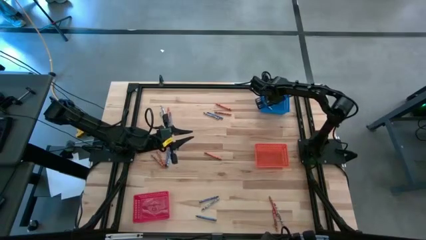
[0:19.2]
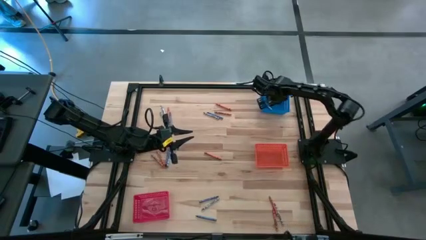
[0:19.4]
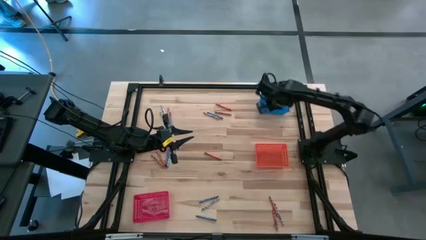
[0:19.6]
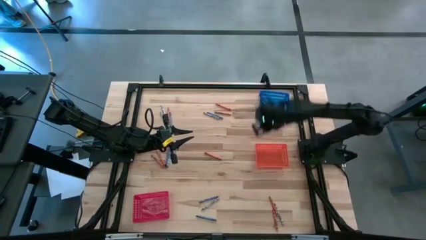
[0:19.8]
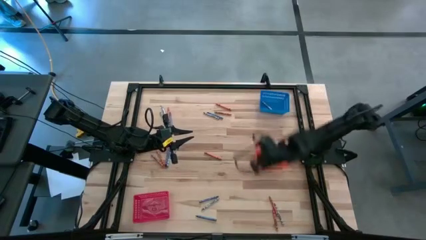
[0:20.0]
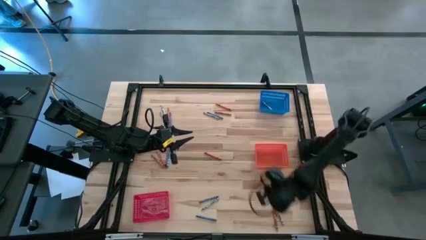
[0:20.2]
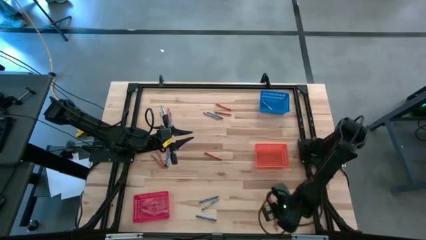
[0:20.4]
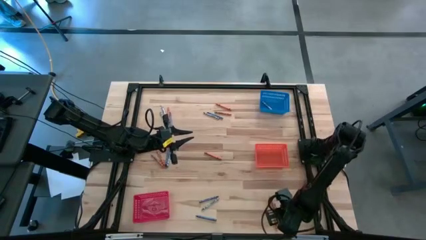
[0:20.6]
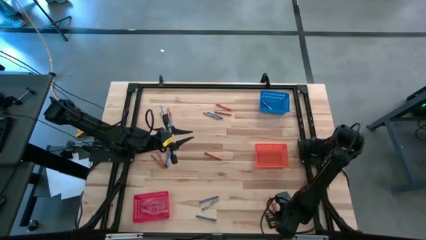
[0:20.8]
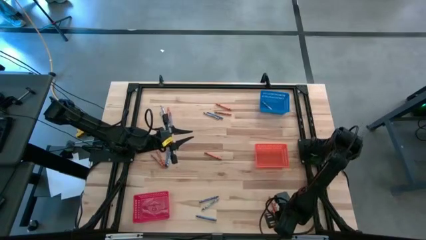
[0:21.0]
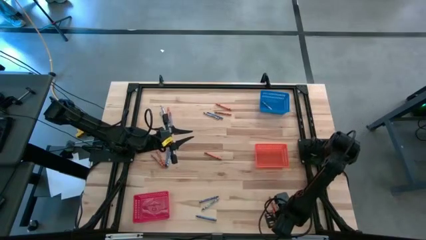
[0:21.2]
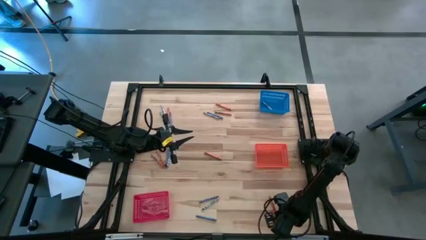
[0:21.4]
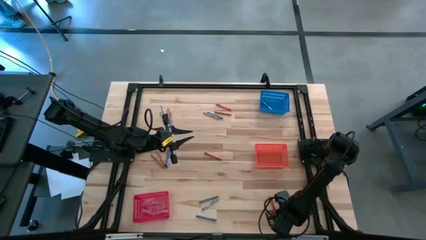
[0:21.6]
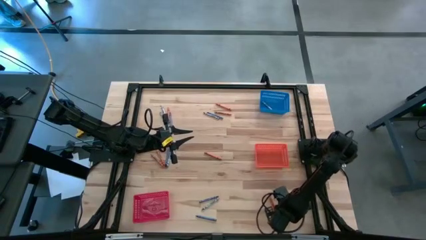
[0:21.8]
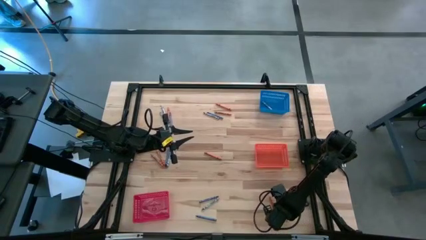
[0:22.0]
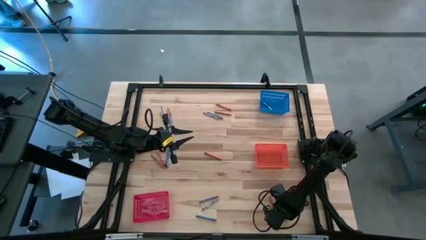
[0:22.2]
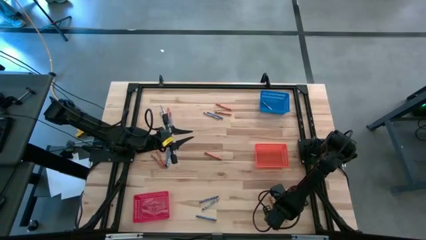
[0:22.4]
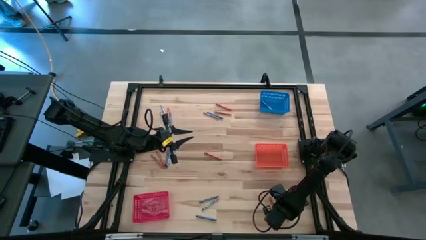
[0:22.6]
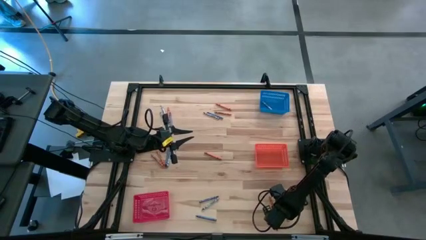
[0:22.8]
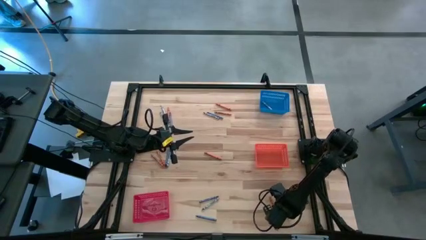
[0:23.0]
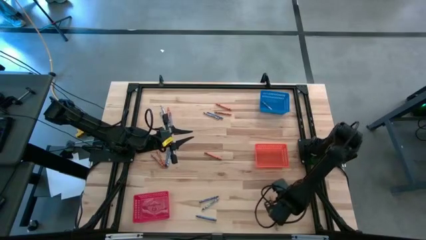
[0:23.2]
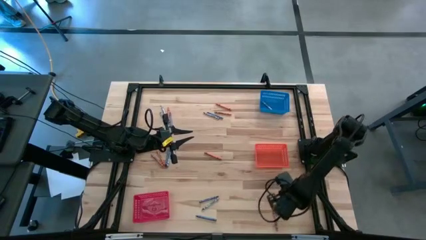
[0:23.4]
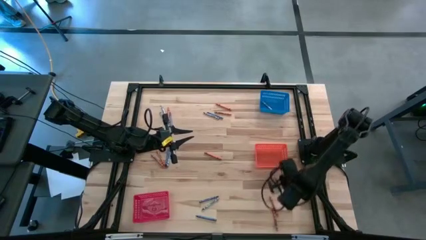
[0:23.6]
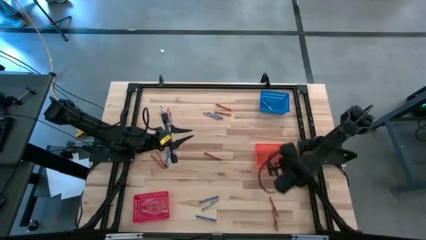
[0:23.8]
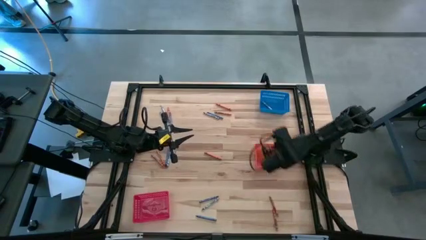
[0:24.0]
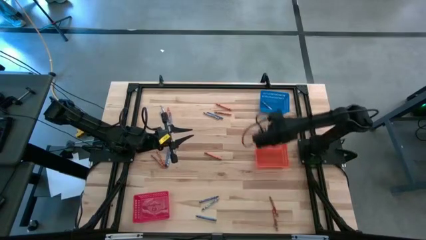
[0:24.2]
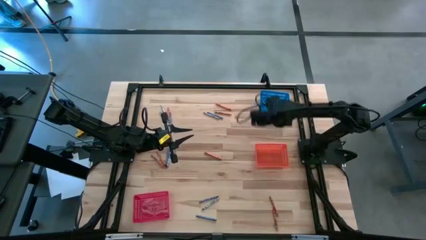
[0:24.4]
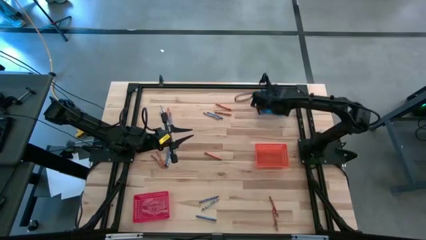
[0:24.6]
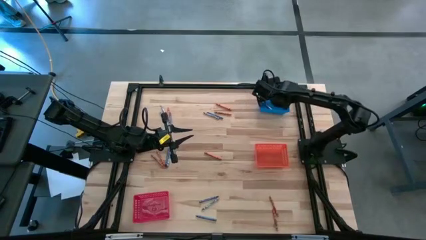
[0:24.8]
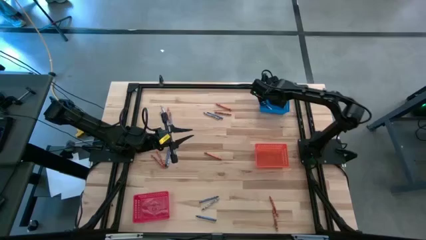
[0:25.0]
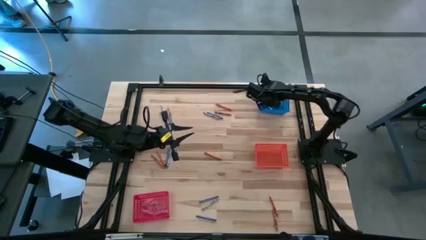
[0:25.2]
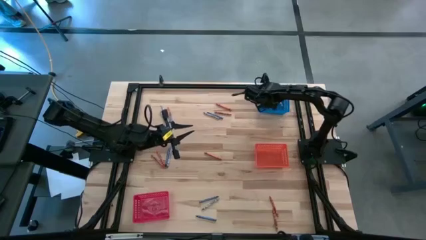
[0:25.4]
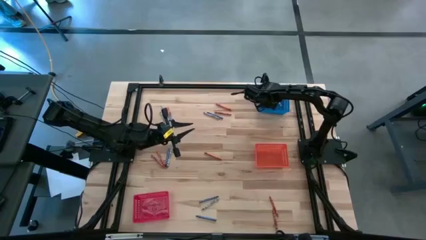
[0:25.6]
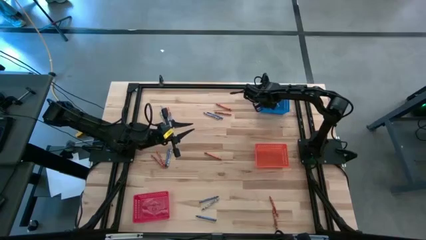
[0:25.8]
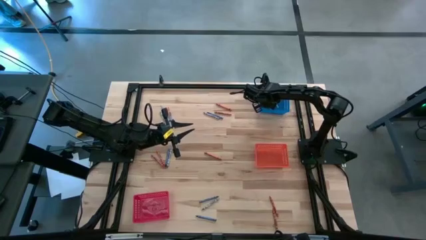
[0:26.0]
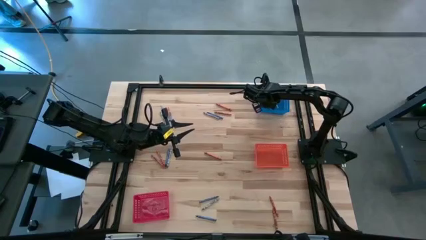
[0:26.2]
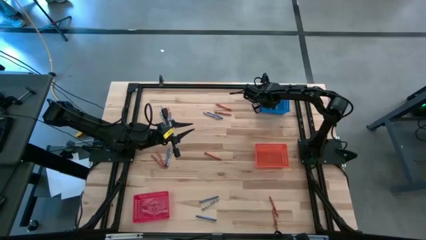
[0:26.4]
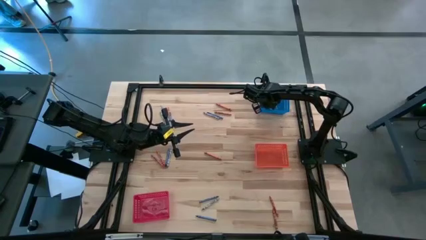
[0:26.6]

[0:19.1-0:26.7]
Task: Sort crayons
Put the gray crayon into the blue bin

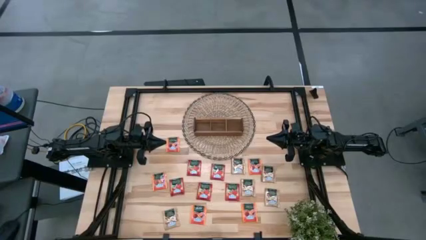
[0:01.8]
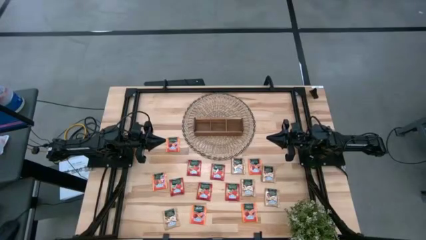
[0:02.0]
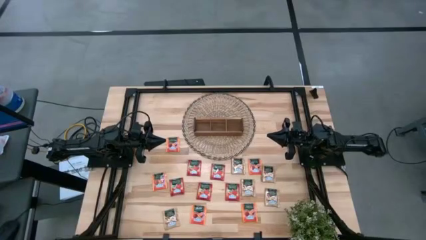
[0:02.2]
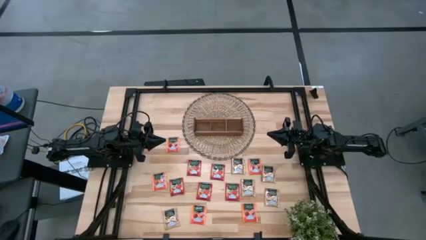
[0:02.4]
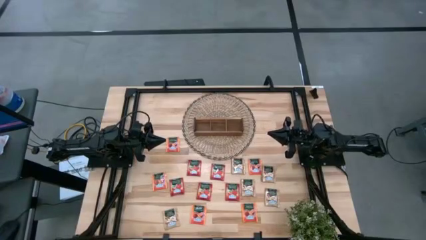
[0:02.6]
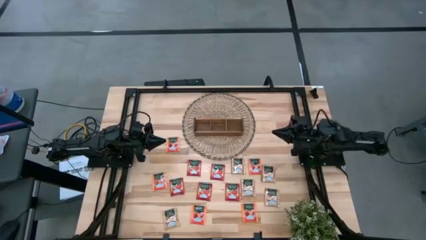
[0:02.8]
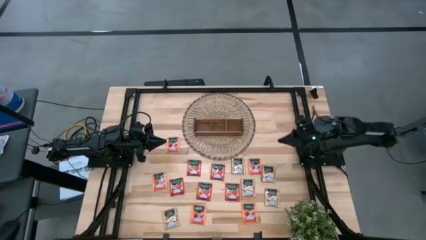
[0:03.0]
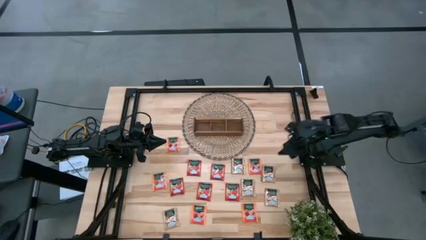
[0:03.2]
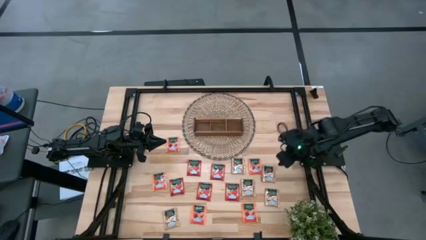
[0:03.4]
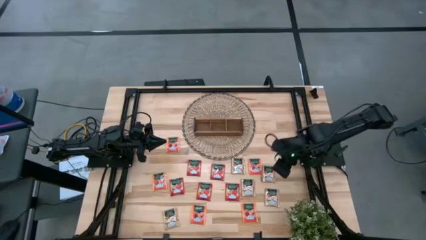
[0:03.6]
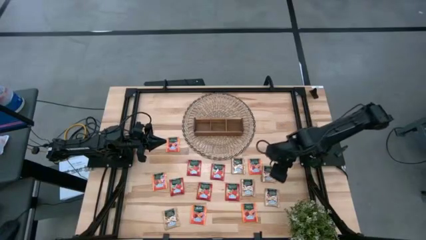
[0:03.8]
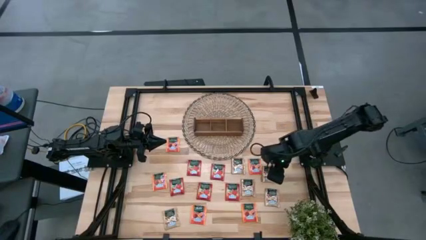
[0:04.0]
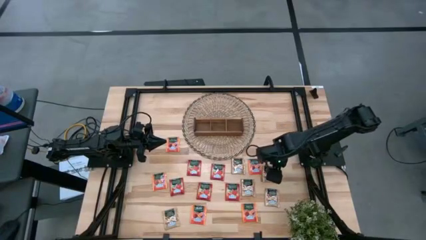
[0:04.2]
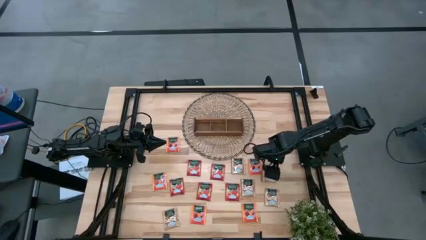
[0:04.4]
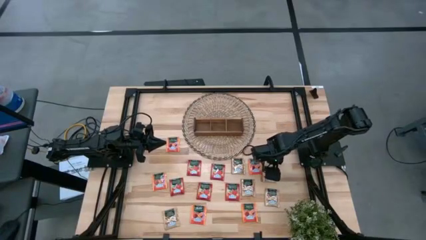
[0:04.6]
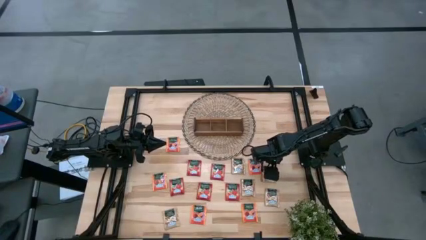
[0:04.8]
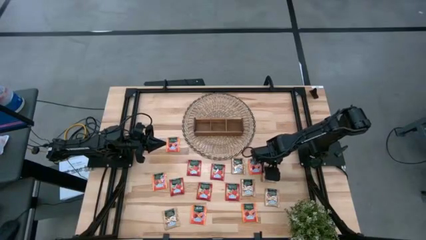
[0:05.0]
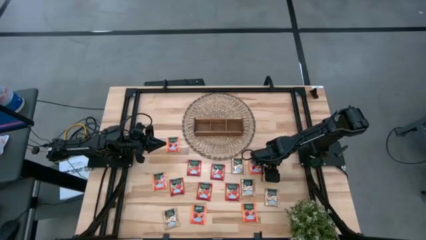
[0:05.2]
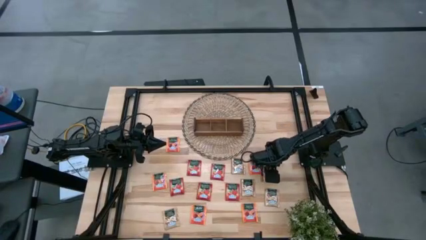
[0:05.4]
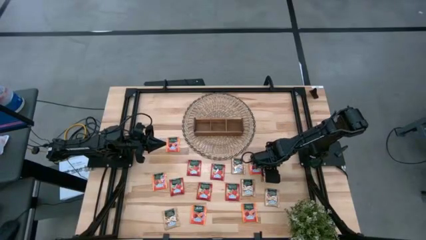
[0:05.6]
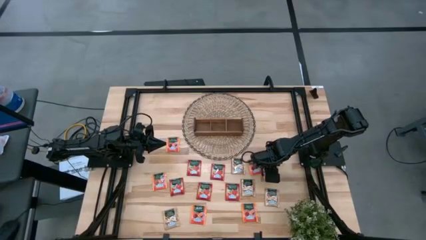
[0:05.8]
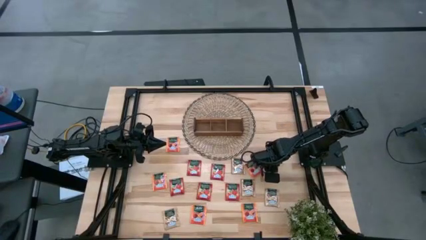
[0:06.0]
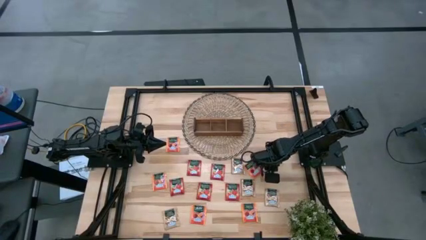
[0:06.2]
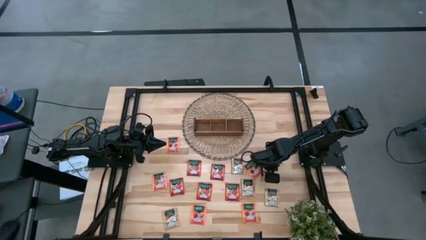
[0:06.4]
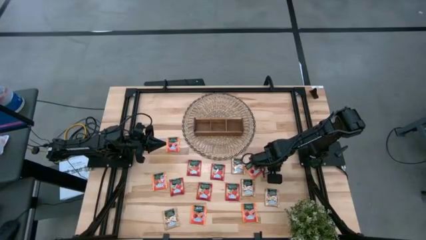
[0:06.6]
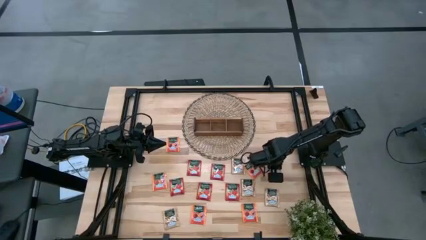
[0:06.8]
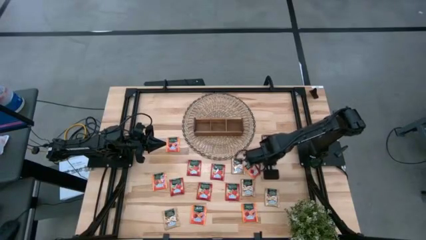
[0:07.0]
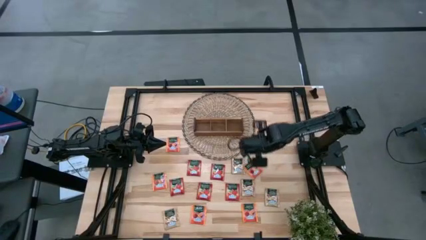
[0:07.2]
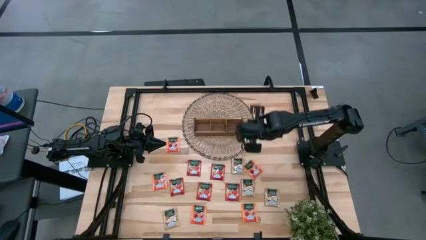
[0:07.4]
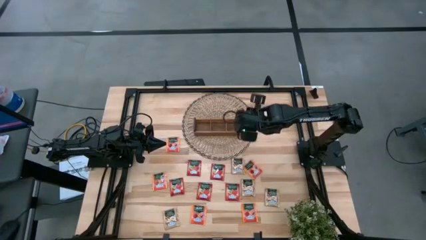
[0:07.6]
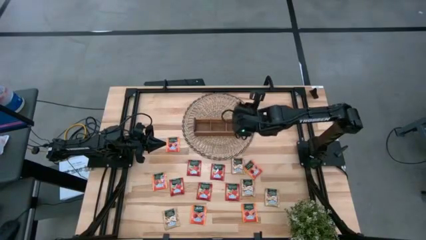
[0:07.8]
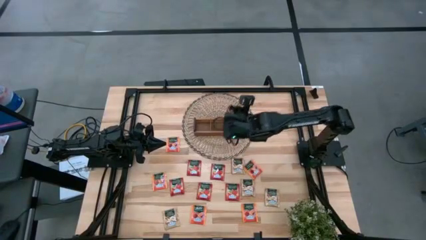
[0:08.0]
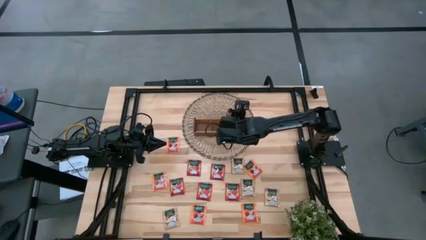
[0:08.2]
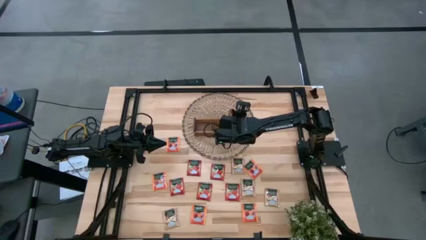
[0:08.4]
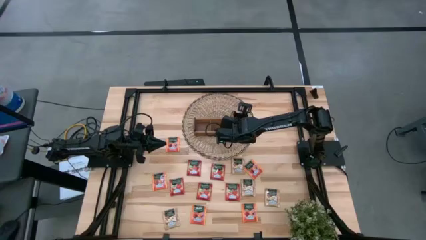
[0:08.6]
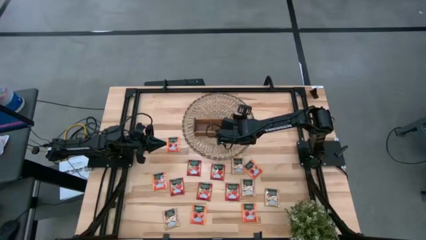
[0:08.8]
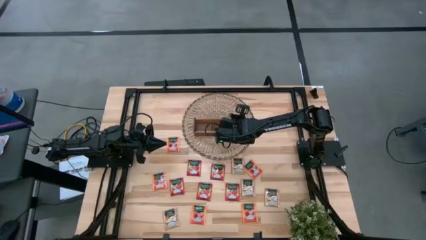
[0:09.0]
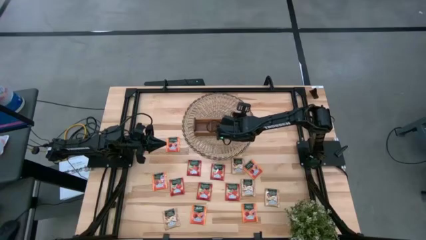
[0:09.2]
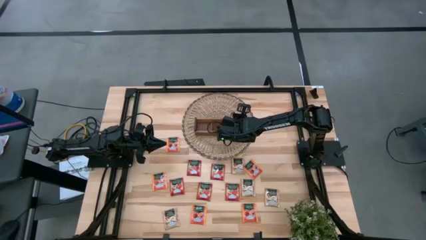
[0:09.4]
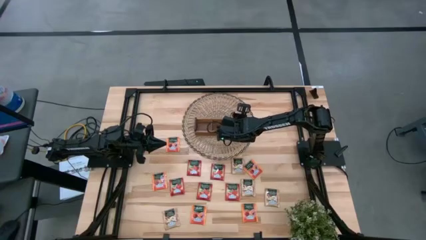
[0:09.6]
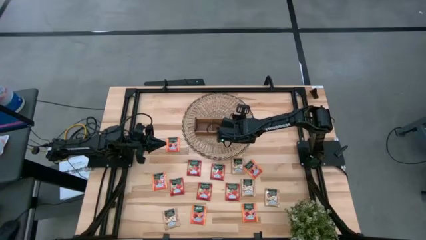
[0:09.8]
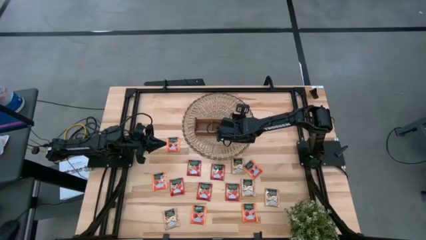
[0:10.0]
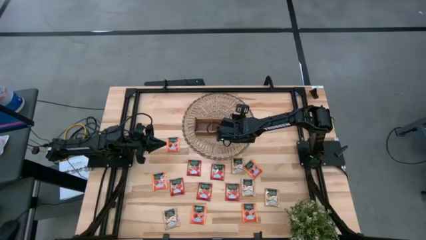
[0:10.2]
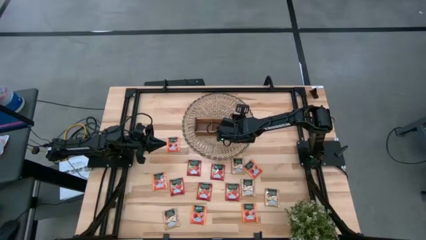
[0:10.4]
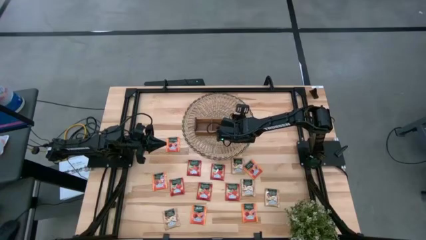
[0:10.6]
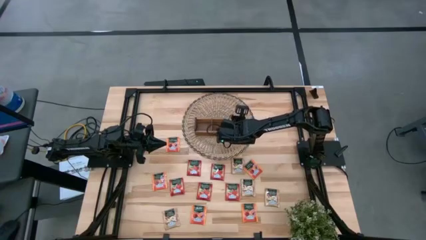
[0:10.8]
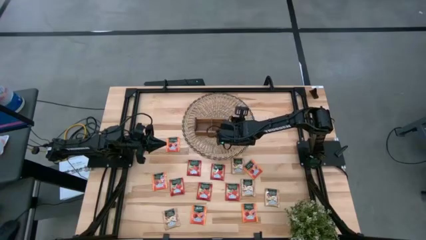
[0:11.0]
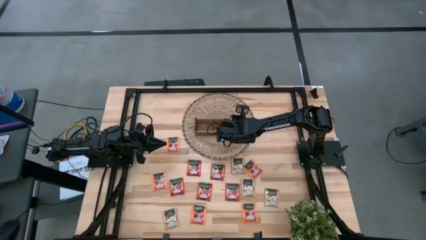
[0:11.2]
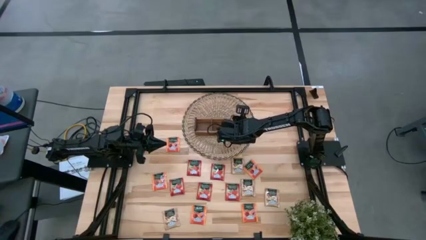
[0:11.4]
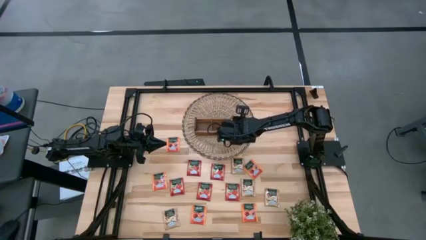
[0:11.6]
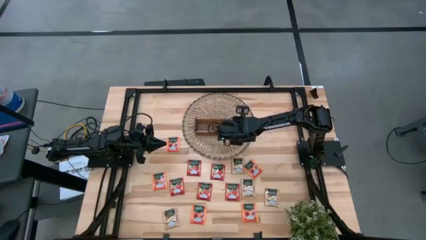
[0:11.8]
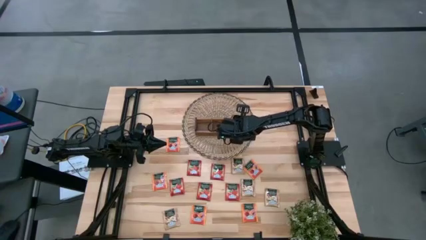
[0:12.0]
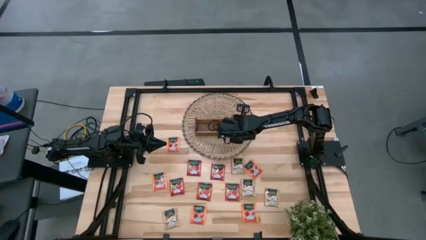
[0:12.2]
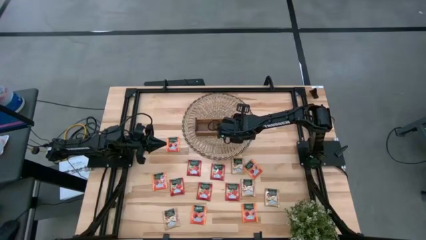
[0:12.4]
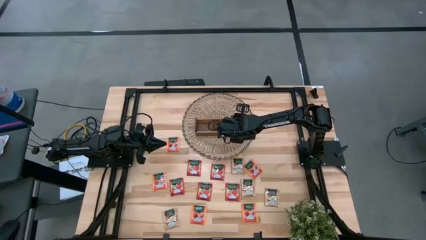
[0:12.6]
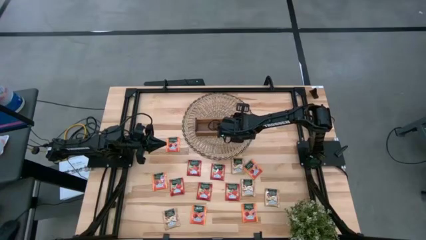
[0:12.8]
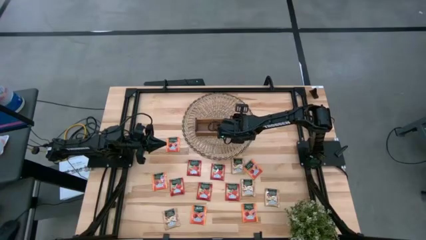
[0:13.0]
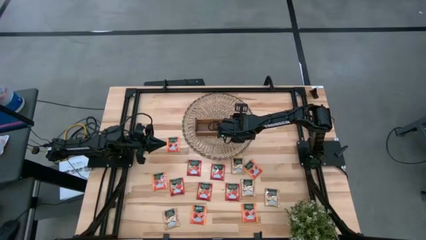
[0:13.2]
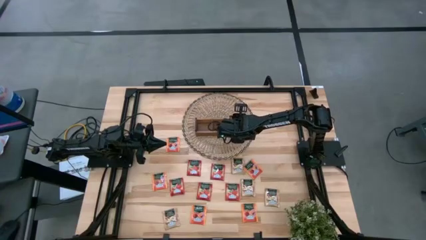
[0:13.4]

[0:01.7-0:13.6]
Task: Pick & Place Tea
Put the brown tea bag into the right slot of the wooden organizer
